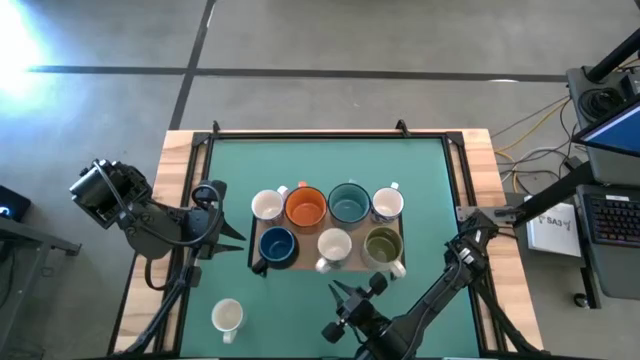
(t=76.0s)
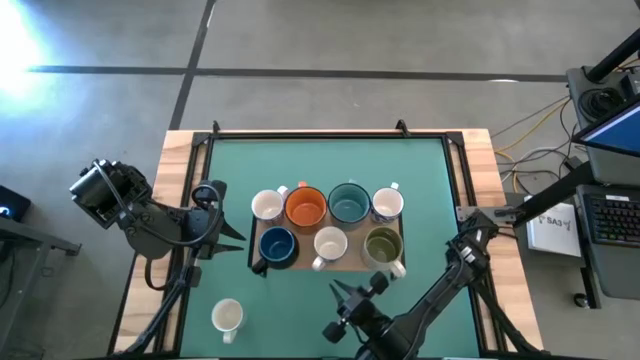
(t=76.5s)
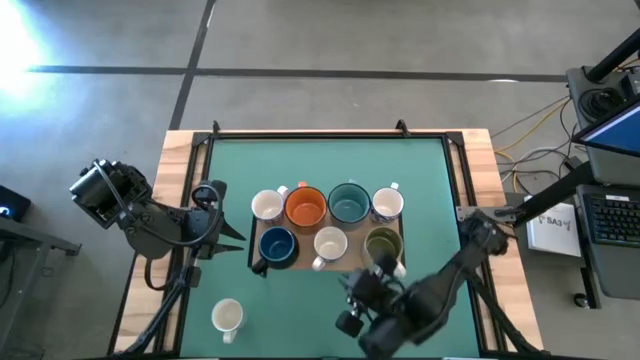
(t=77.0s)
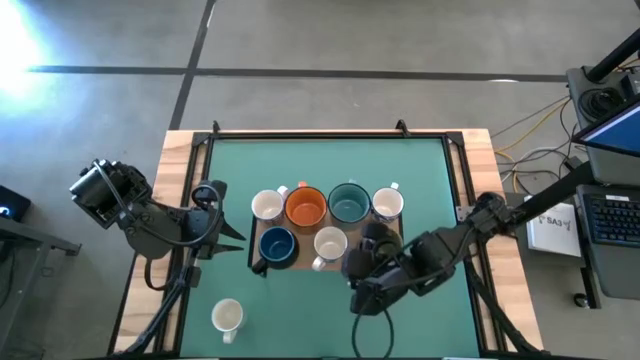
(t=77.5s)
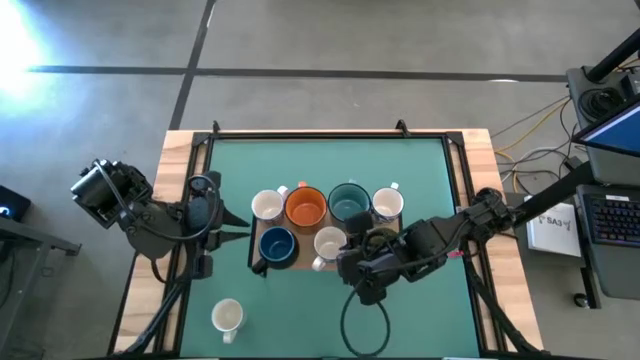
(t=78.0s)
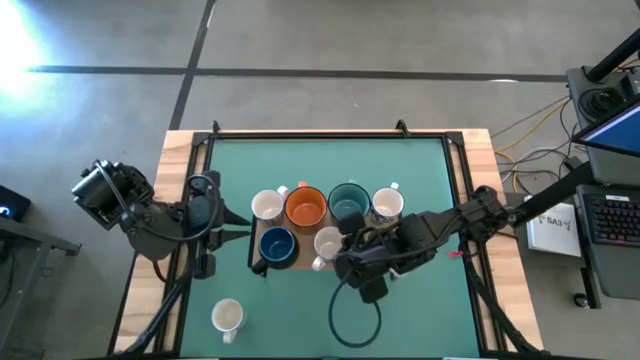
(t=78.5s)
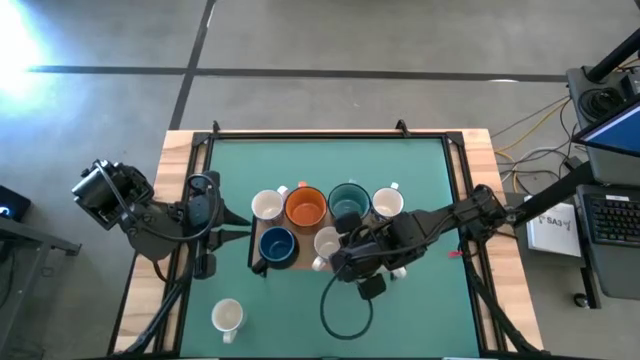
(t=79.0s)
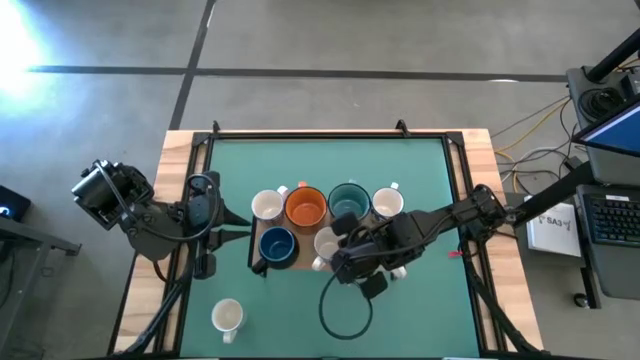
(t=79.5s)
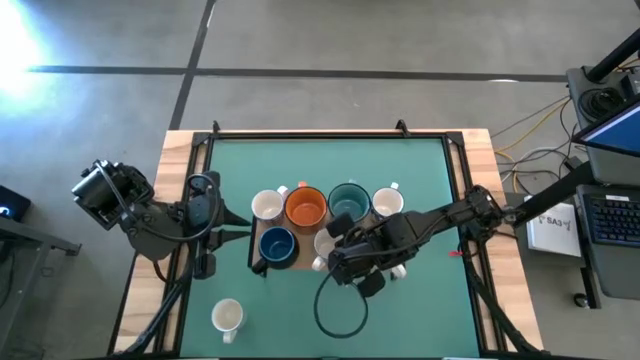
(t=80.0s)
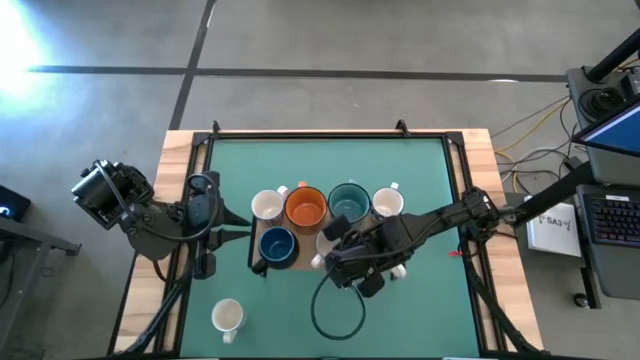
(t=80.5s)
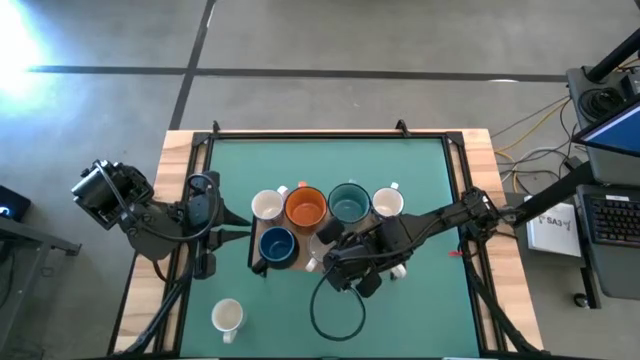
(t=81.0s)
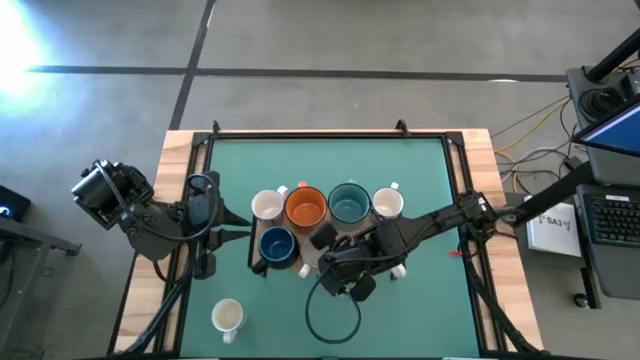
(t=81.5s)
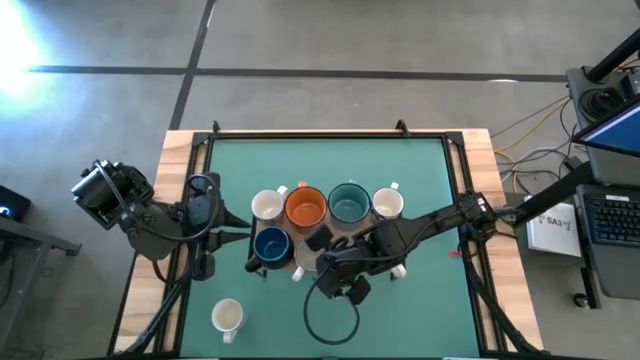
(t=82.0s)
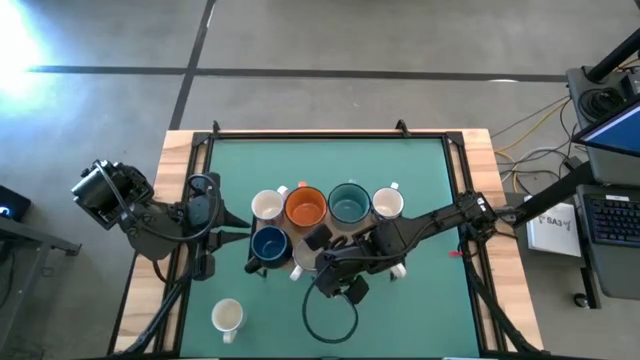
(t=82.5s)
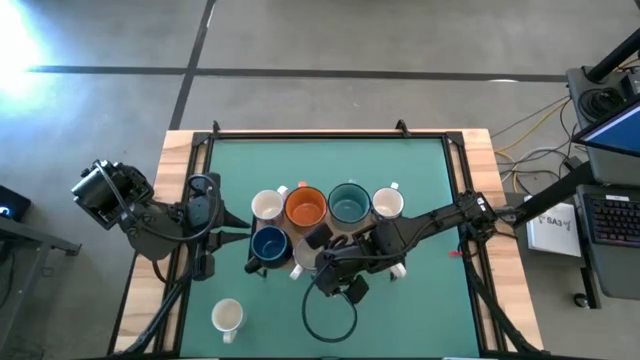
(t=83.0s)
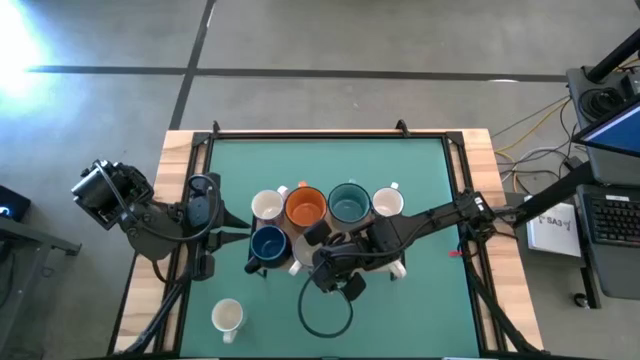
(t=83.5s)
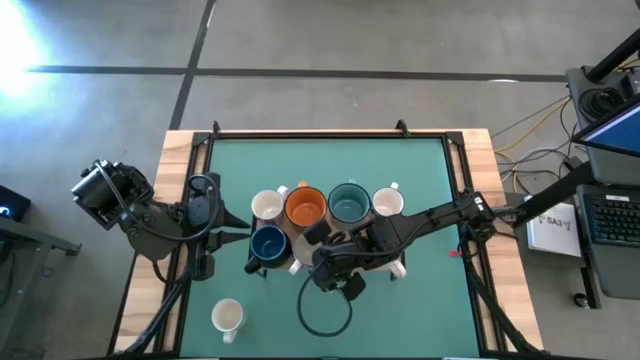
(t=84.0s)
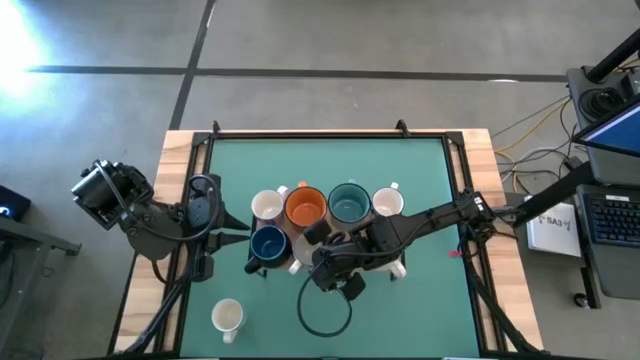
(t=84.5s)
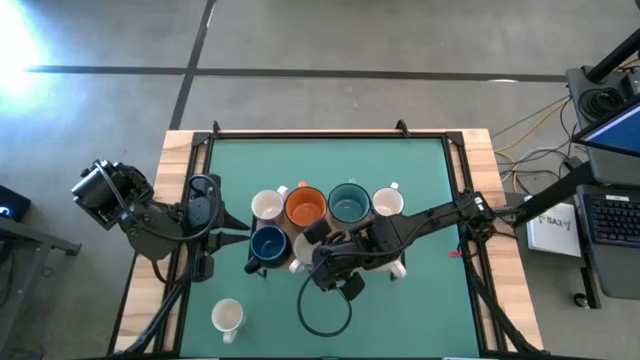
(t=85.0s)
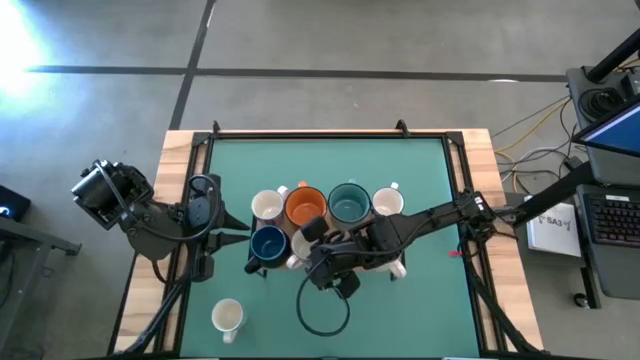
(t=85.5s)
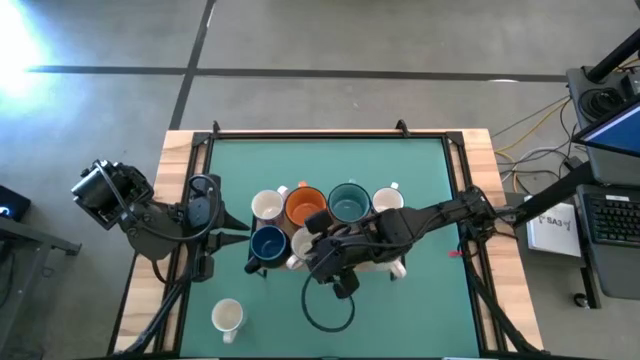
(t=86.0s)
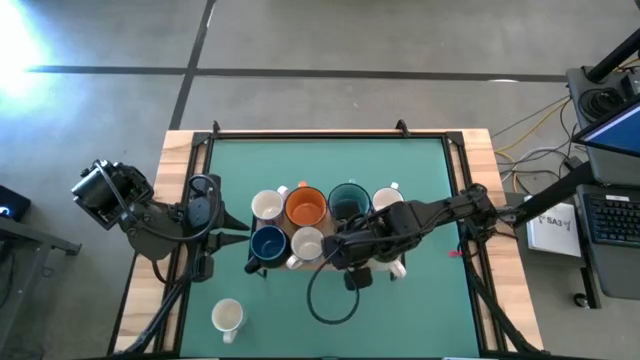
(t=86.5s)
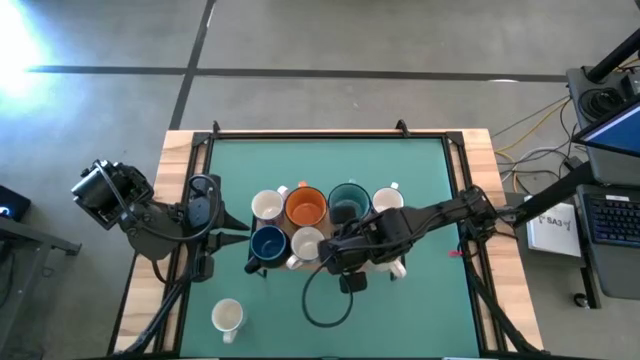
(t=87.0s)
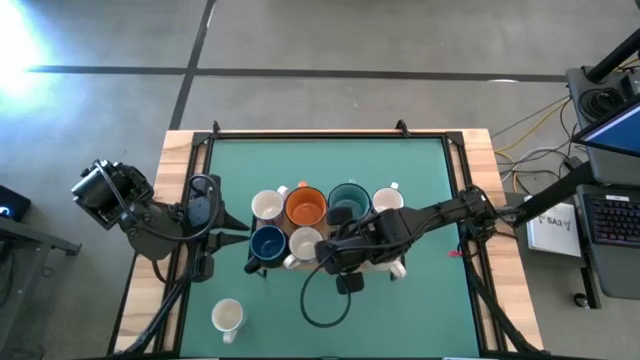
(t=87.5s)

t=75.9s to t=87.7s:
Task: Place coffee mugs
Put the blue patterned mug on the shelf

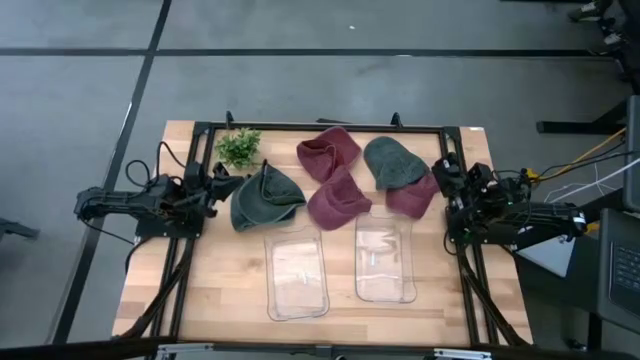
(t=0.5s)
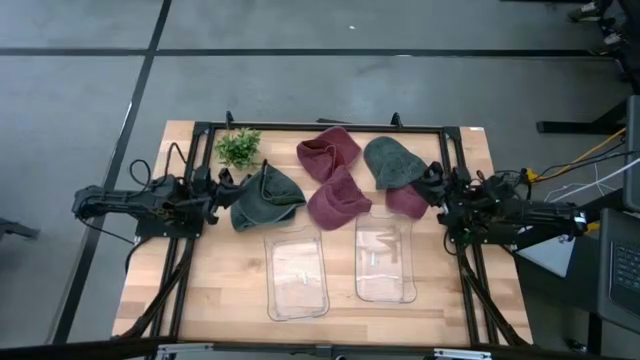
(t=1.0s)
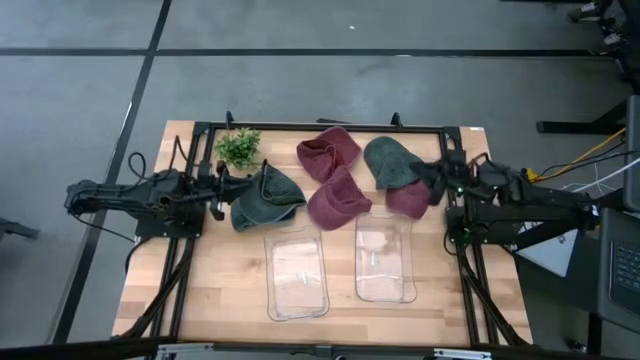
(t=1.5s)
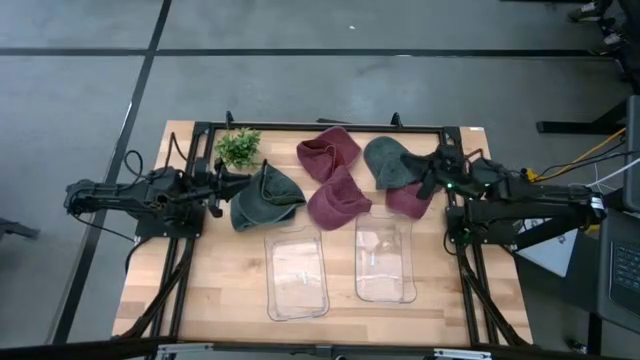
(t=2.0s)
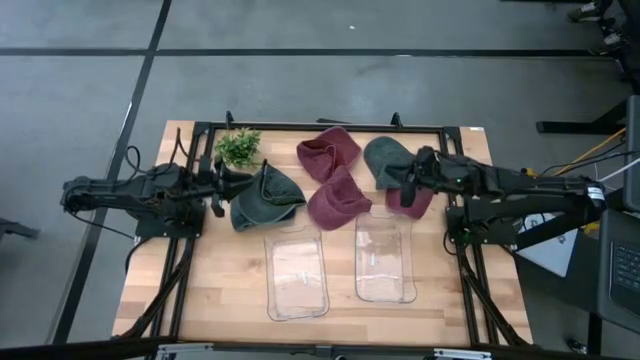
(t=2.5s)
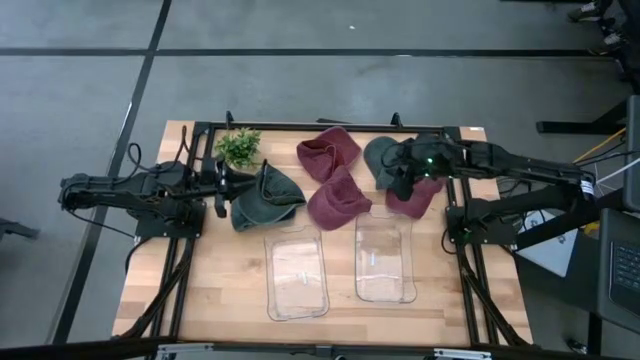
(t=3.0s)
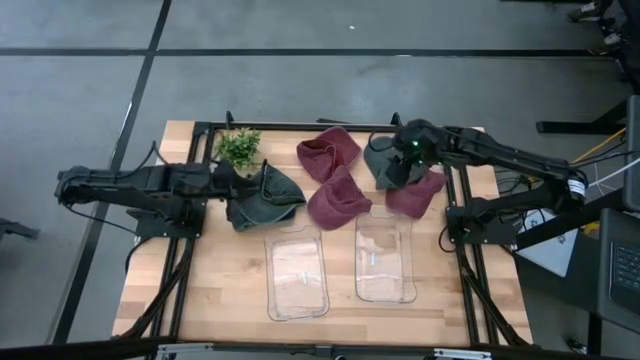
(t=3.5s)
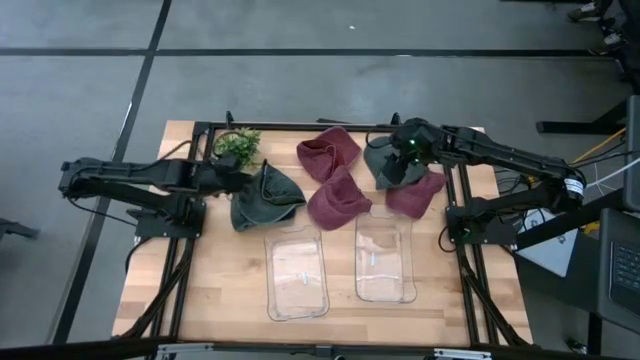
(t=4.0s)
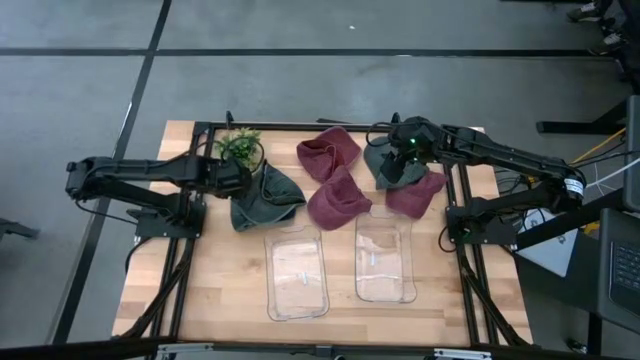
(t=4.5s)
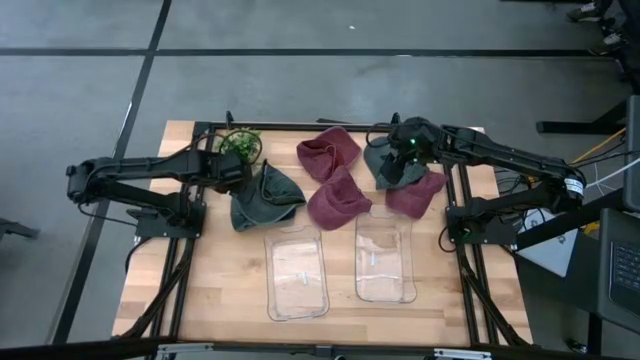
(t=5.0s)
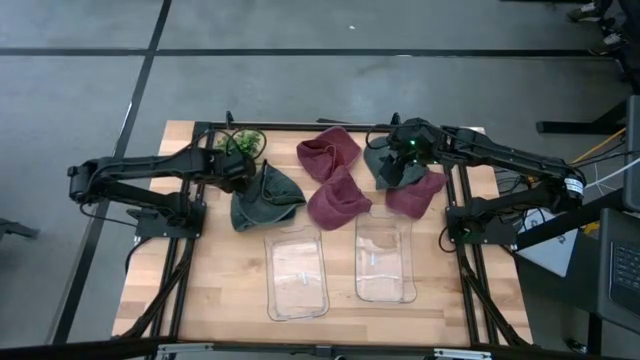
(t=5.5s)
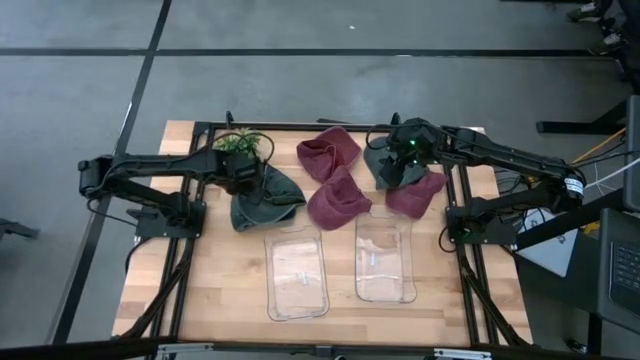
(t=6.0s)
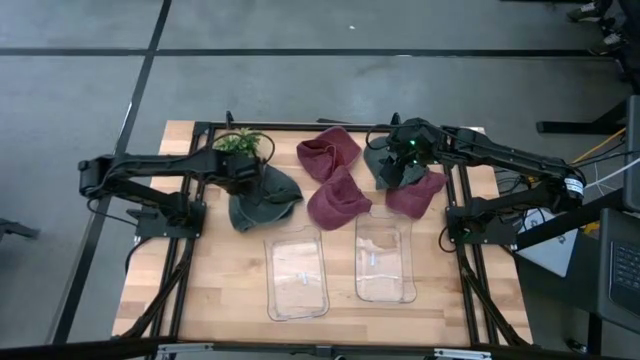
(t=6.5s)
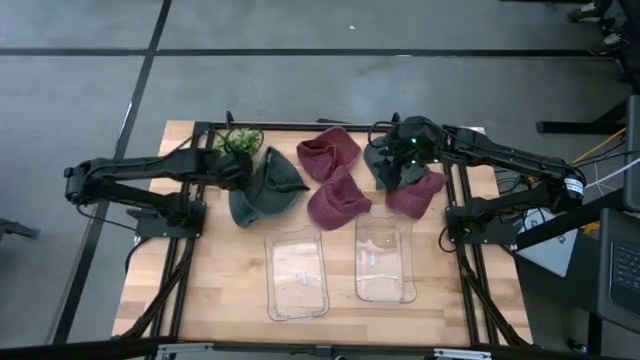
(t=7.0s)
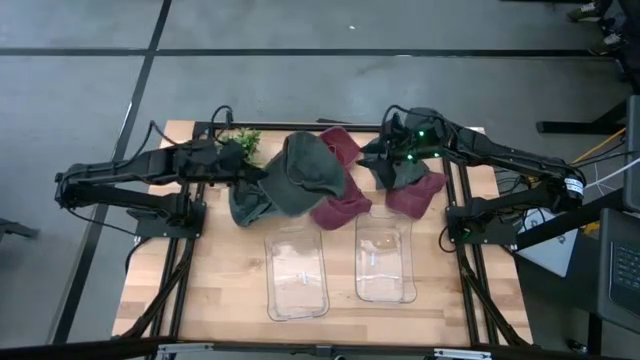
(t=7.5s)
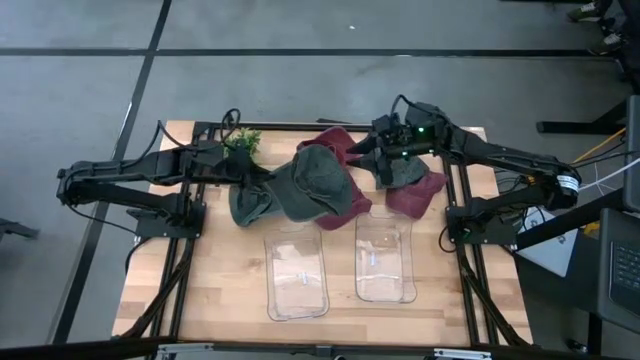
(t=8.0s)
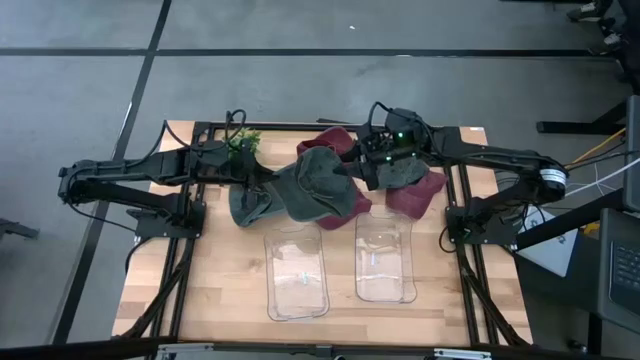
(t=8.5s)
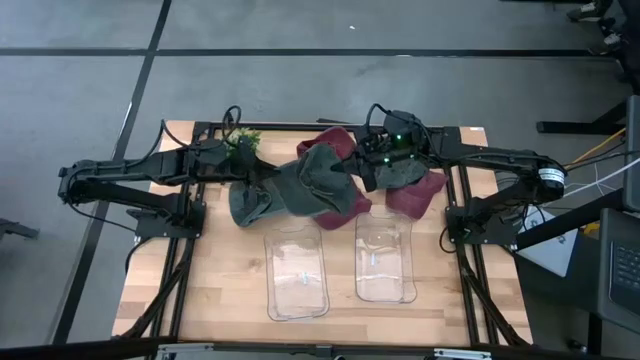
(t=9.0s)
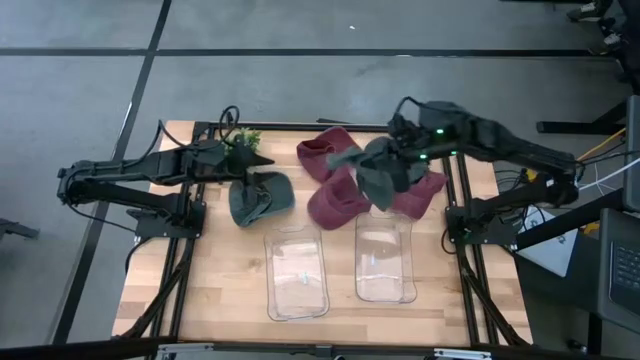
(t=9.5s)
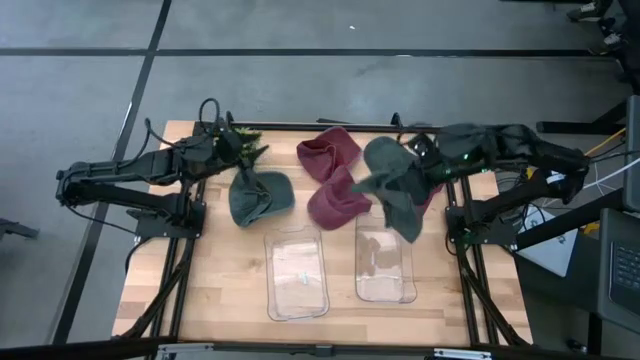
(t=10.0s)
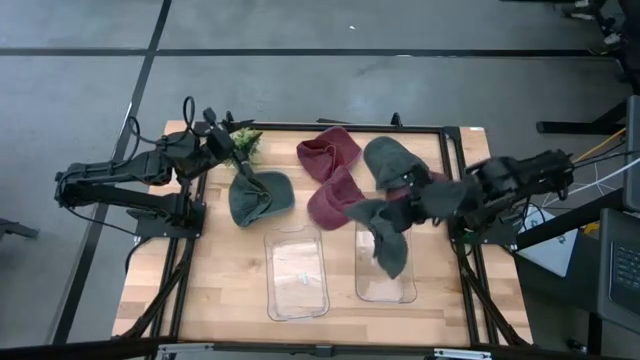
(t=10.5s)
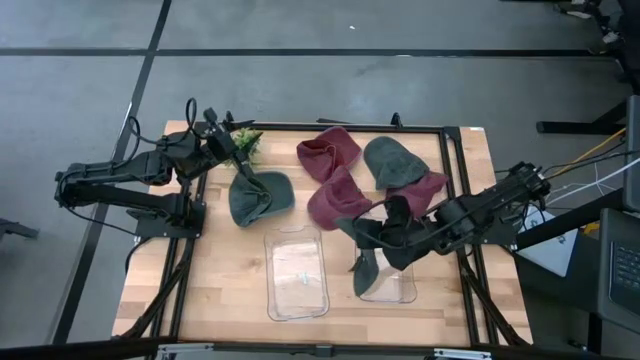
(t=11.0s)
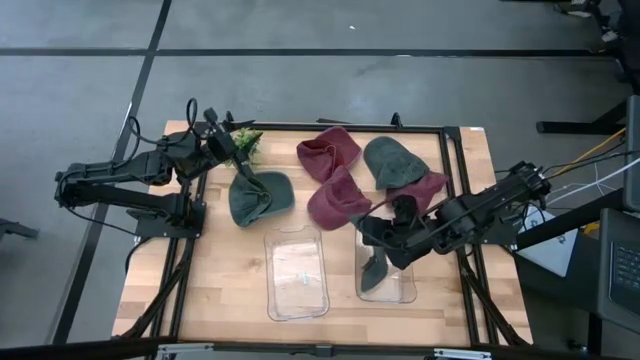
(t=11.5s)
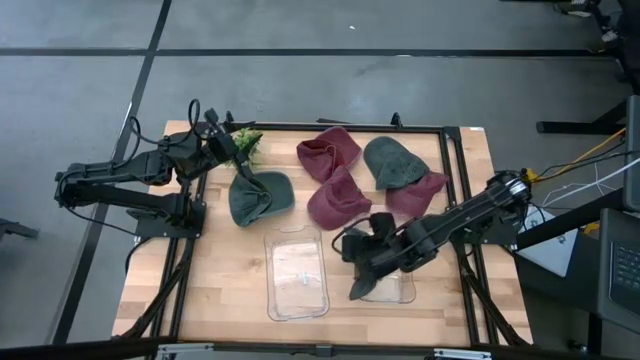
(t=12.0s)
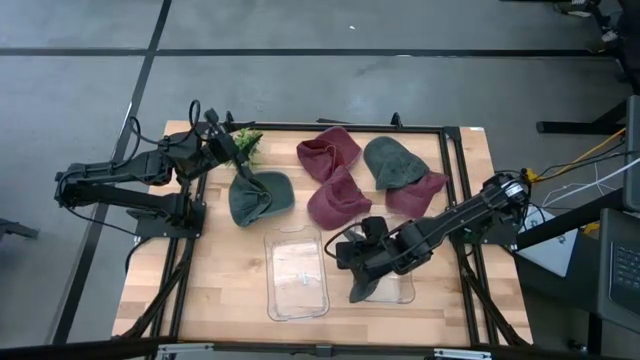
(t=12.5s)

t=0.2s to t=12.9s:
Task: Pick & Place hat
Put the top left black cap into the right transparent bin
